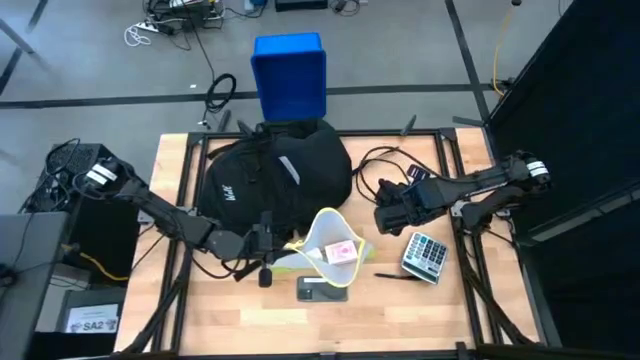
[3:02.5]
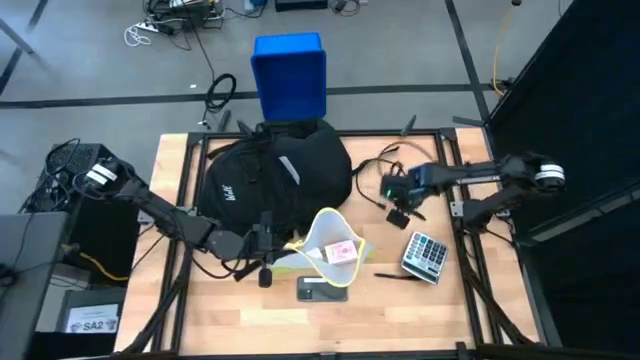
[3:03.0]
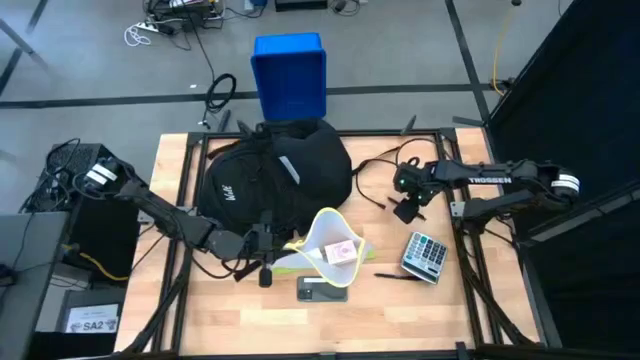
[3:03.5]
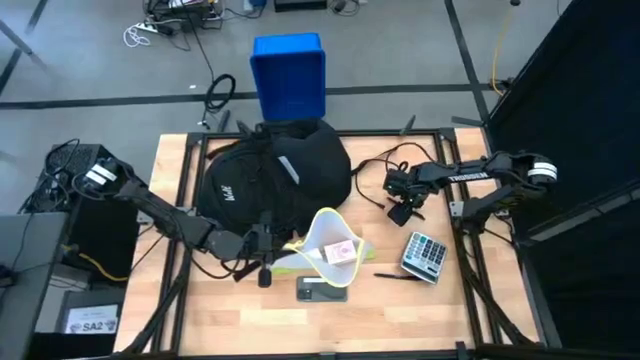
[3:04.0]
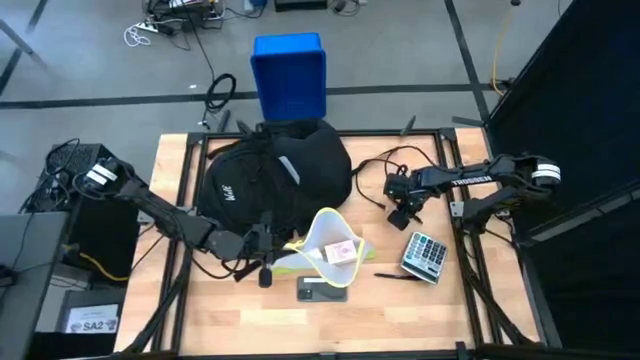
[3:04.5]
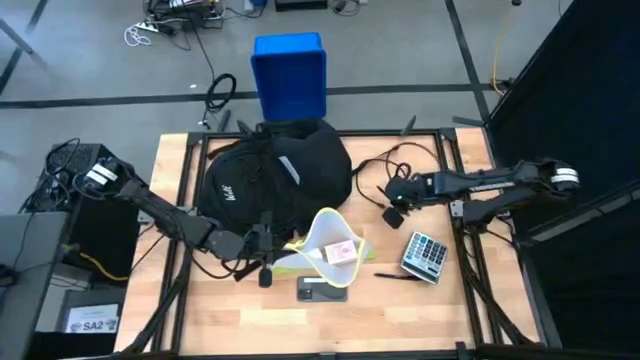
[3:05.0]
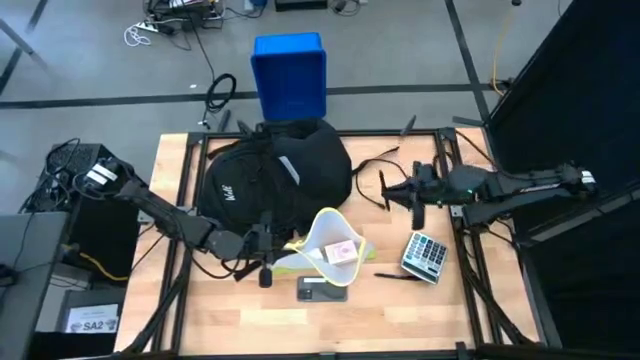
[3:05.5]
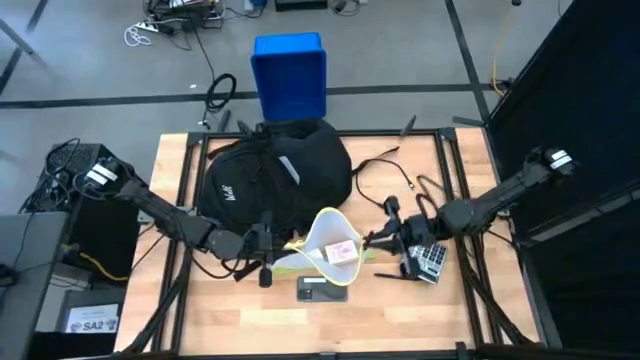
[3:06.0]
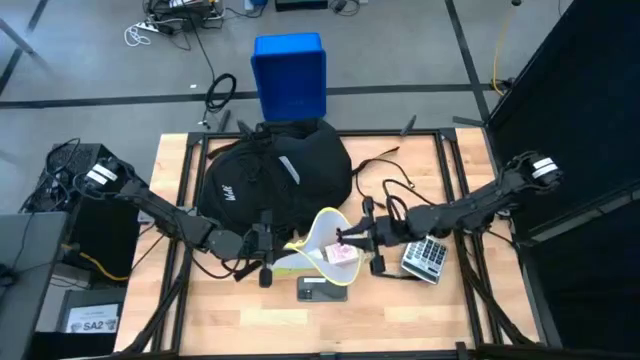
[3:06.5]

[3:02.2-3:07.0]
Task: Unpack backpack
Put the pen into the zip bag

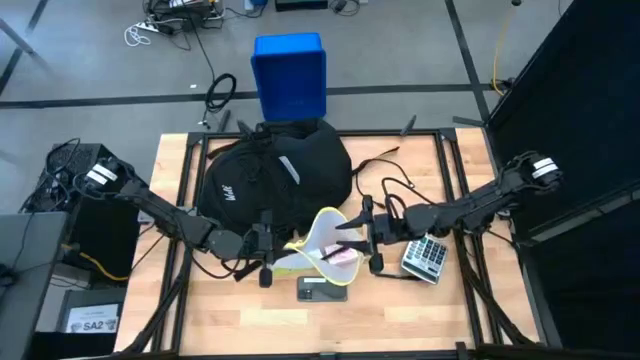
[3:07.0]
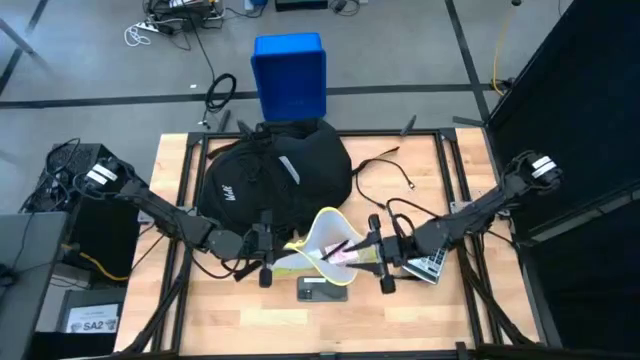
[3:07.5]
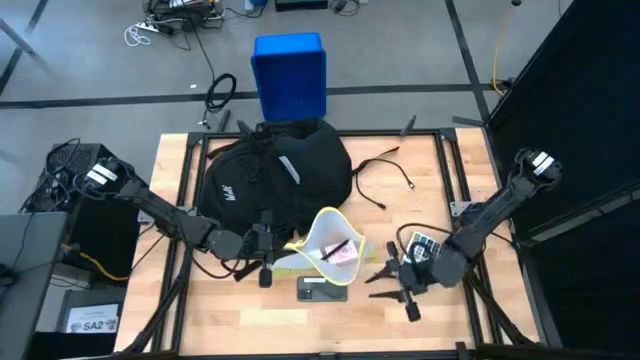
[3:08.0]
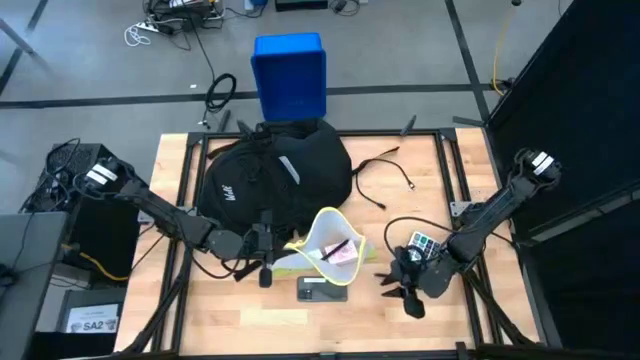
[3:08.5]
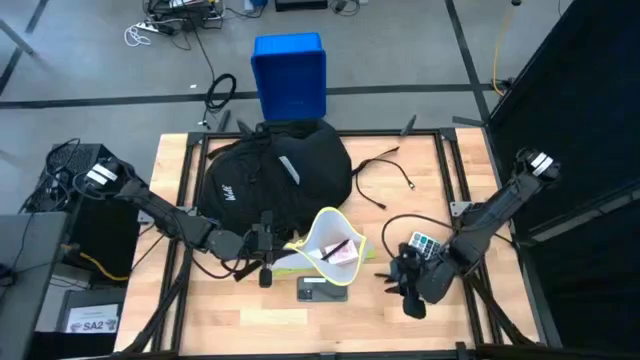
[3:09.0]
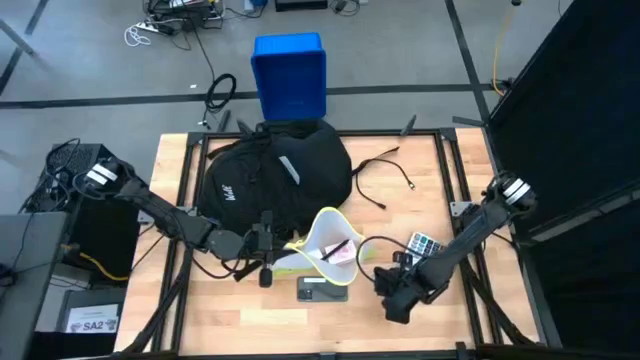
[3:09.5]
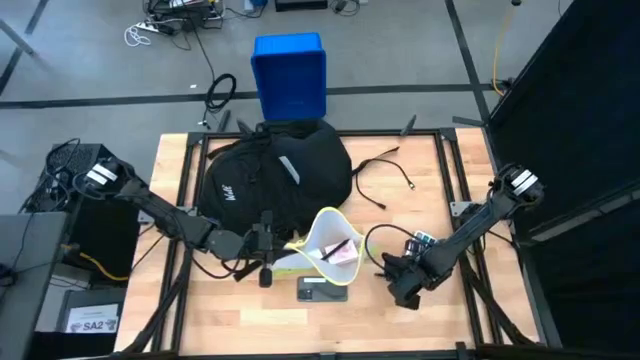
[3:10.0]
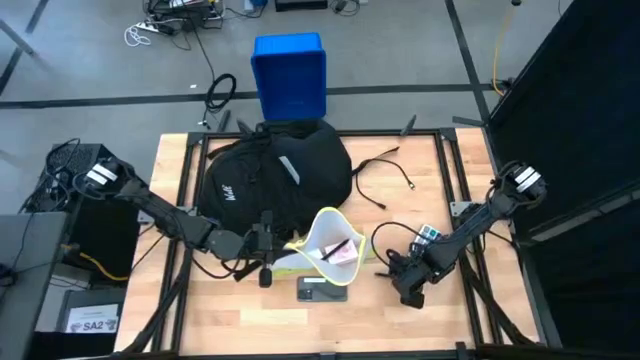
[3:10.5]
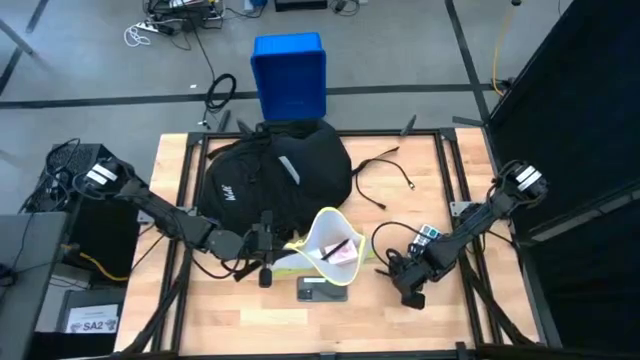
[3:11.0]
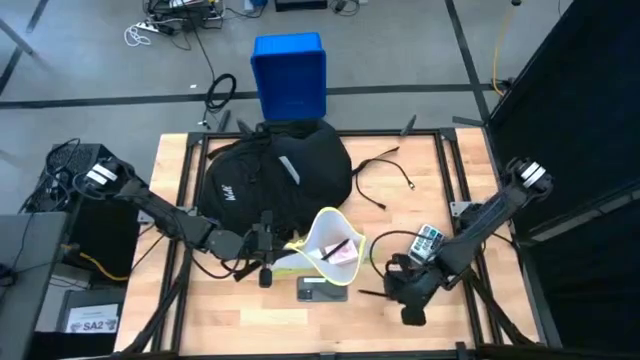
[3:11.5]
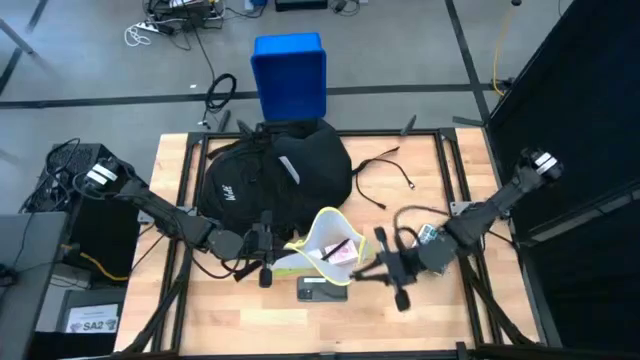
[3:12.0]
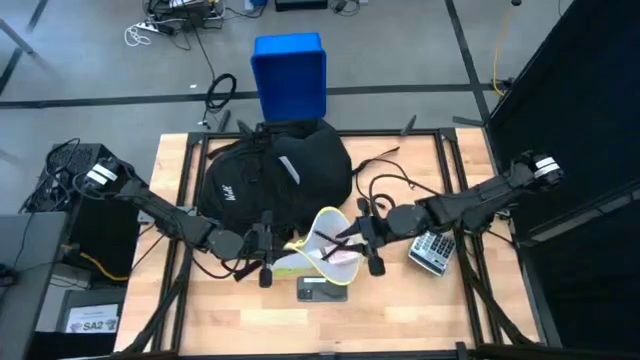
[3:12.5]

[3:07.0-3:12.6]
Put the pen into the zip bag

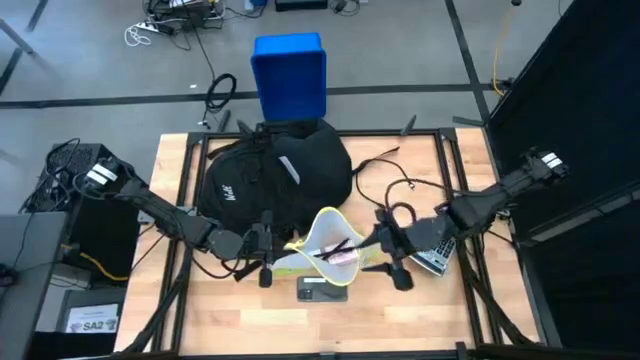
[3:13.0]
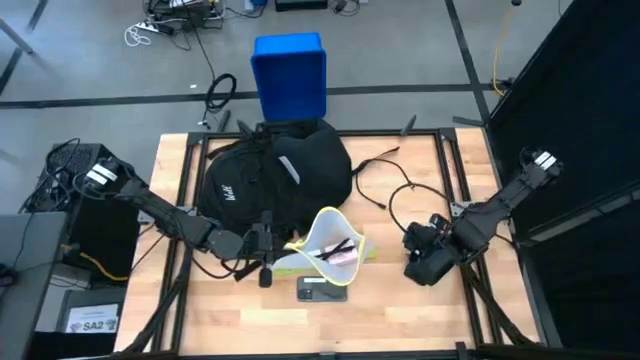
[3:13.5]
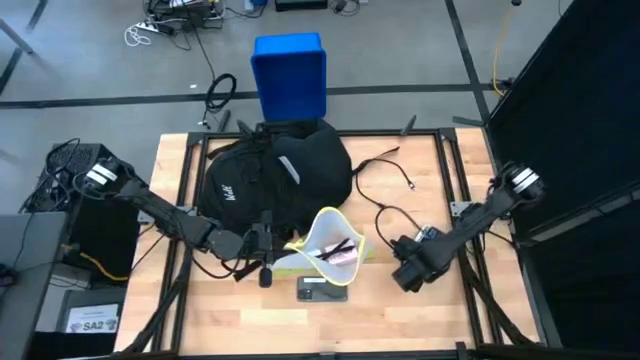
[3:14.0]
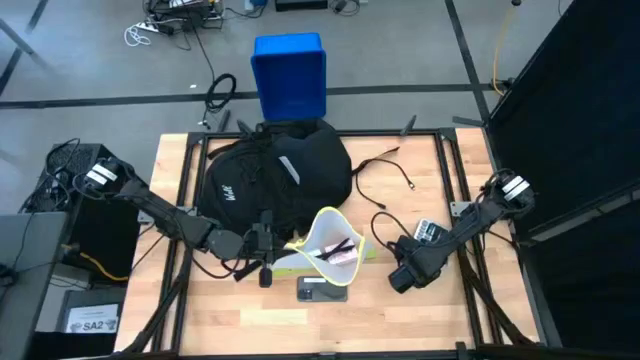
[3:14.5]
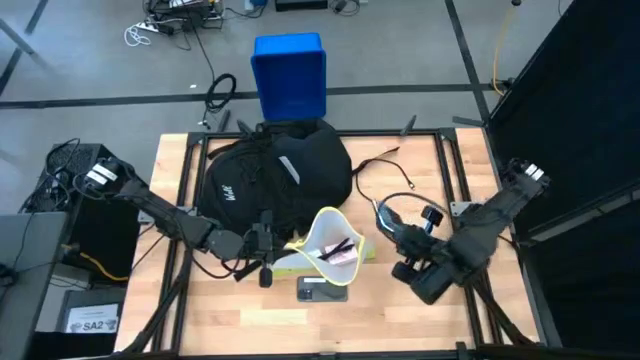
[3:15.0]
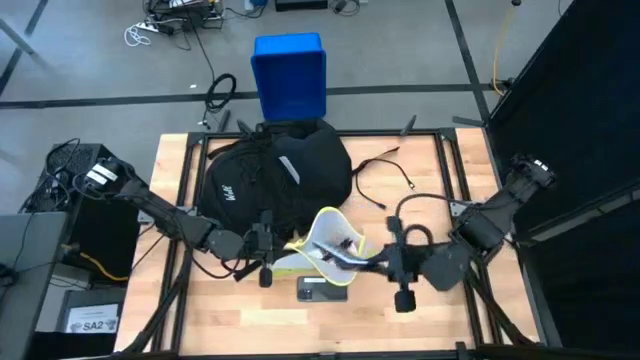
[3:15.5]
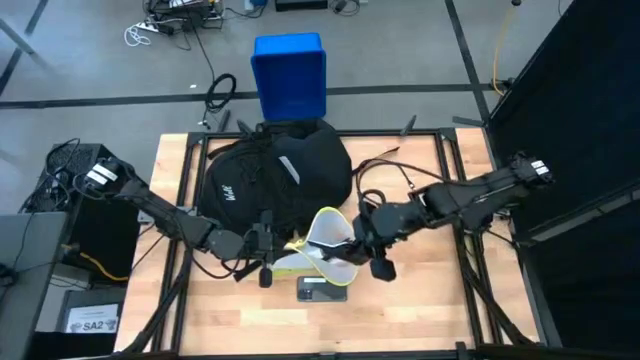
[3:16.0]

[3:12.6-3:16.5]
Put the calculator into the zip bag

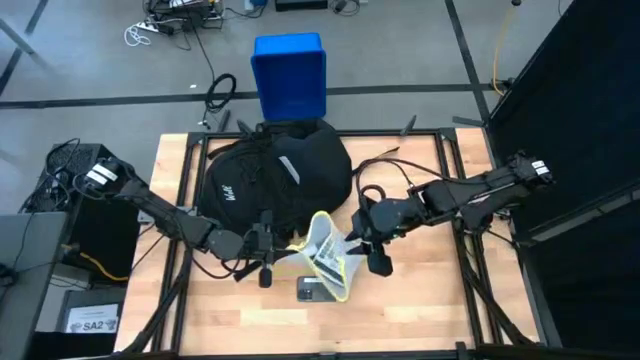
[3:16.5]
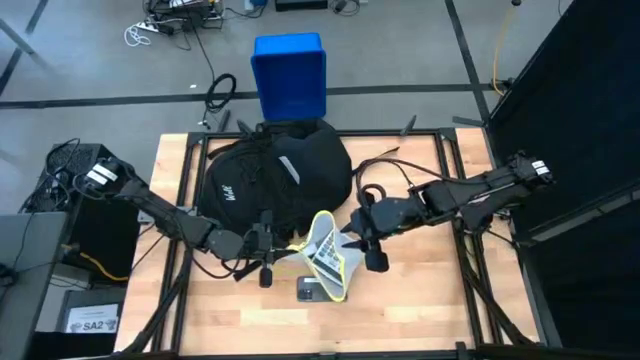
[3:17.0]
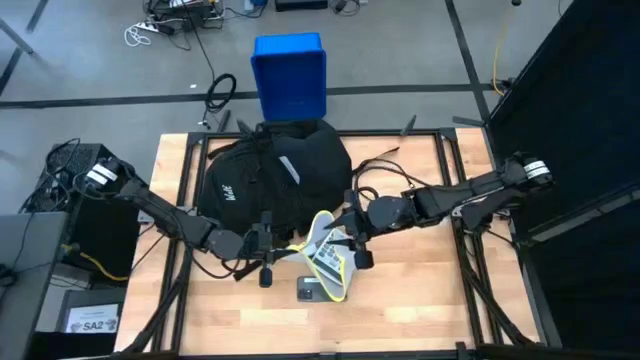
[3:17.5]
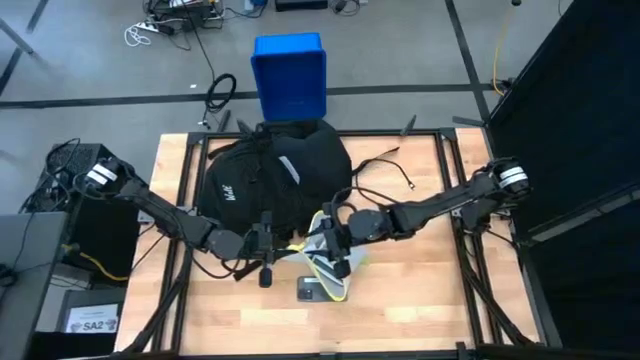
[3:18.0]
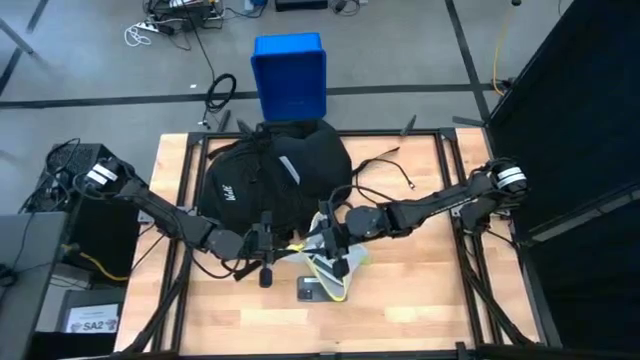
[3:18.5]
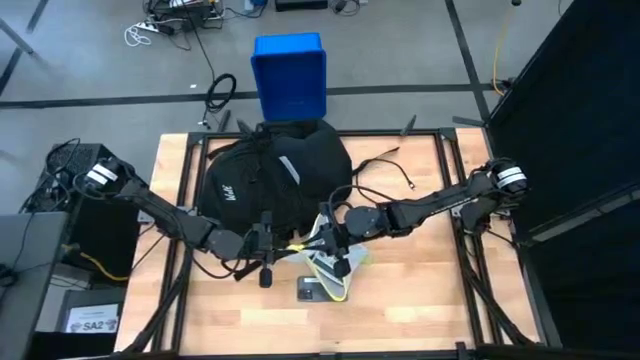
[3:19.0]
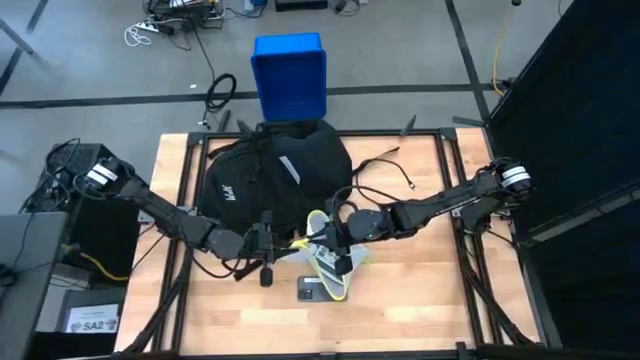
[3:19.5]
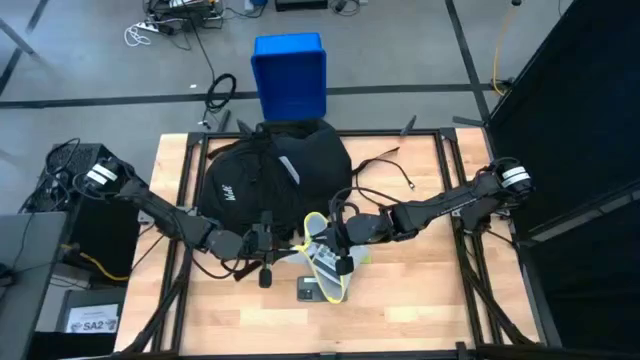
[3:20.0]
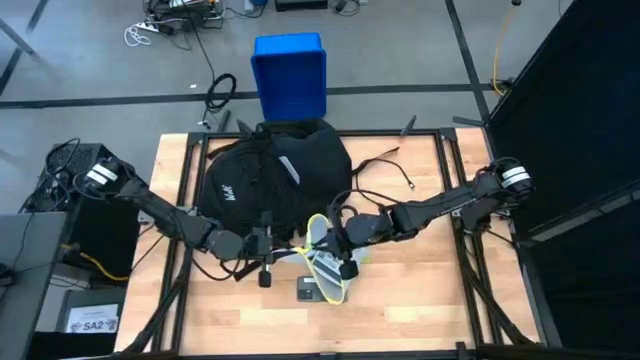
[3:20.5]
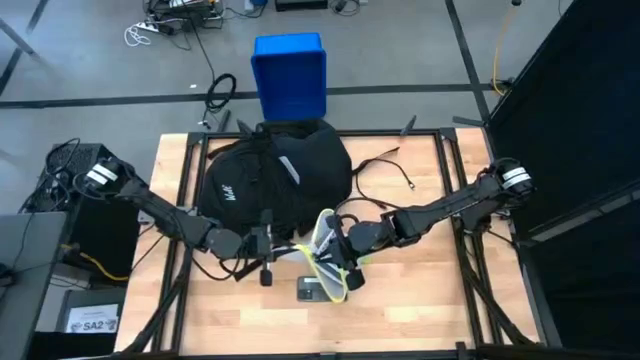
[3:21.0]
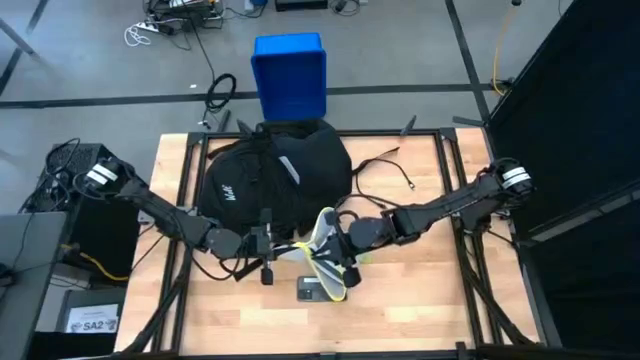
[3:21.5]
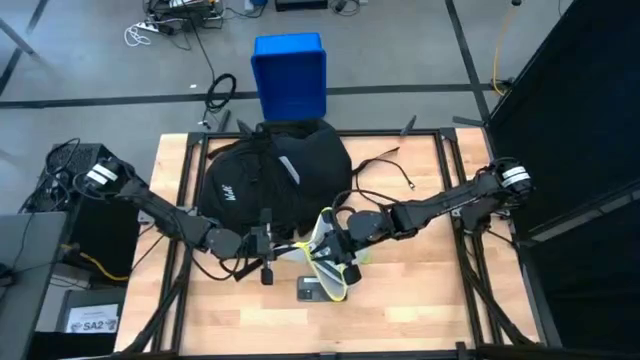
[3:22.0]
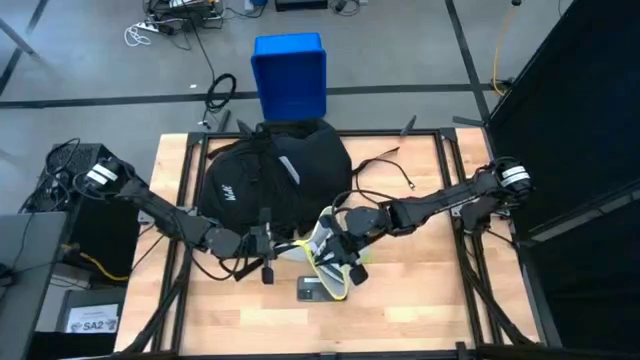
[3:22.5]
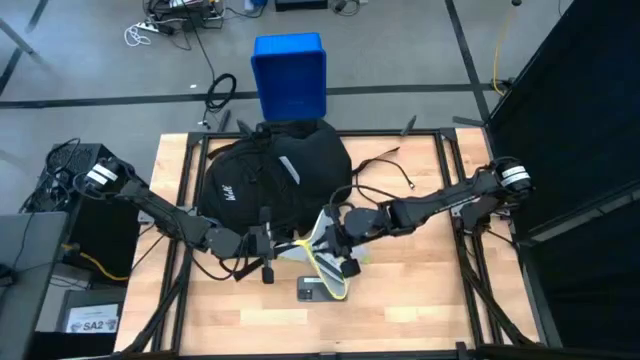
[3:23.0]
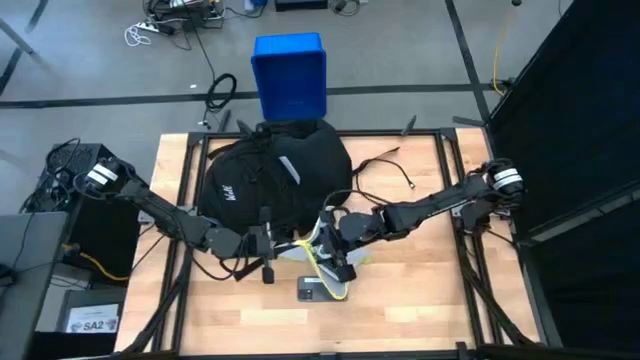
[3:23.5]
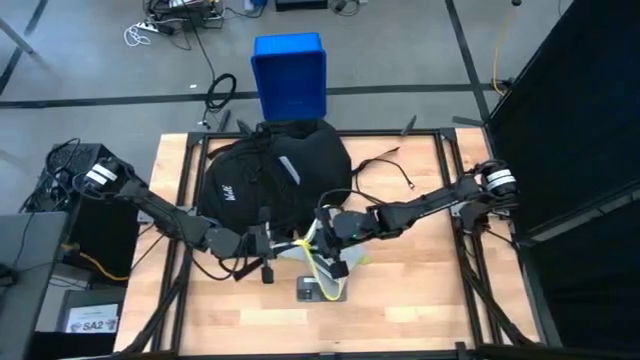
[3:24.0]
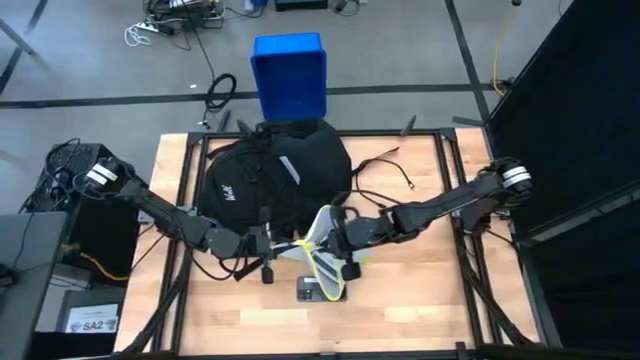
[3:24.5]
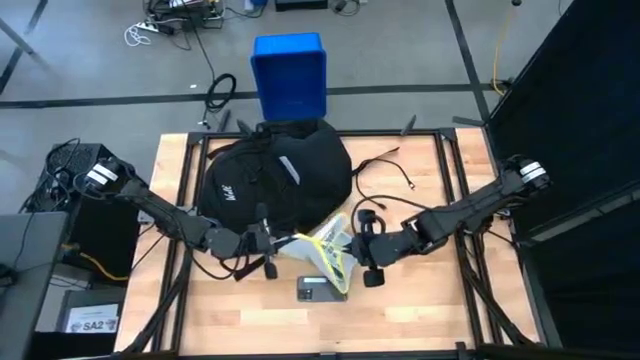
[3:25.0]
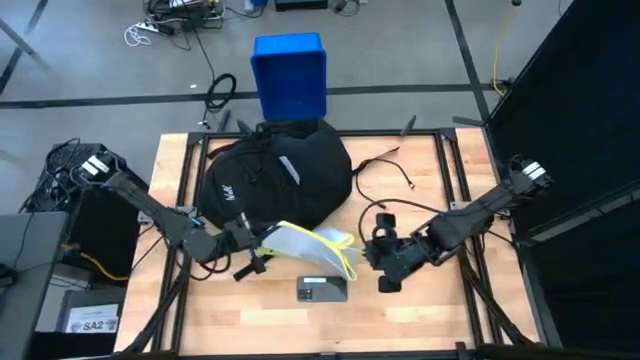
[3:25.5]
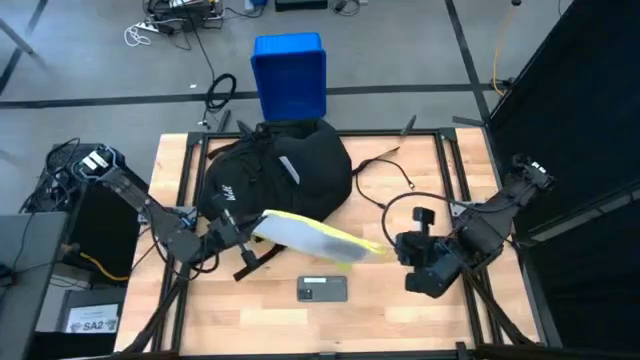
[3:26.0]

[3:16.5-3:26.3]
Close the zip bag
